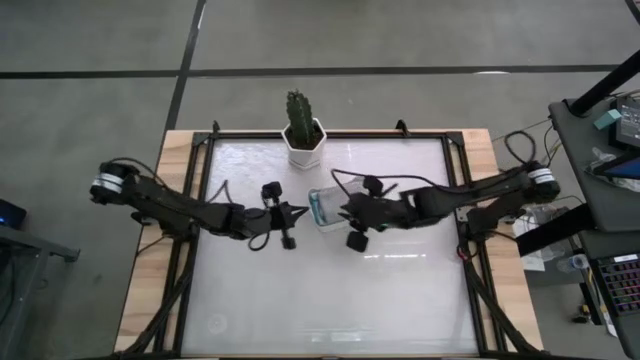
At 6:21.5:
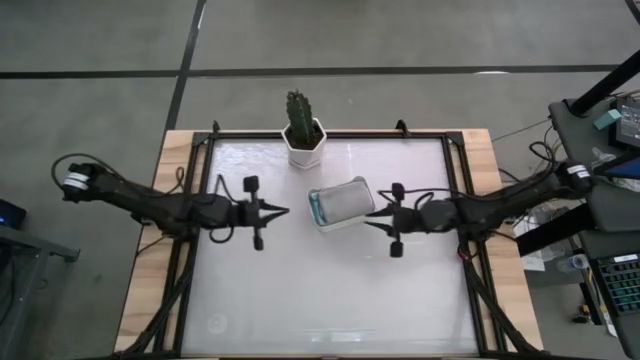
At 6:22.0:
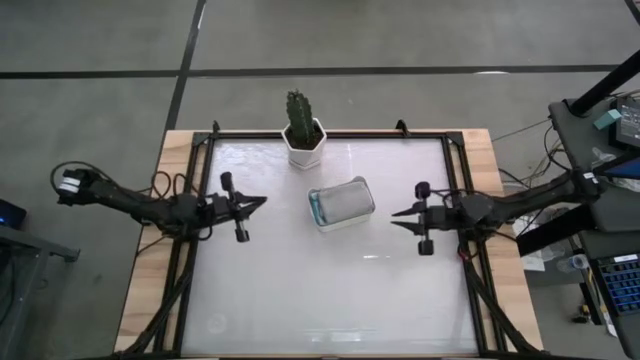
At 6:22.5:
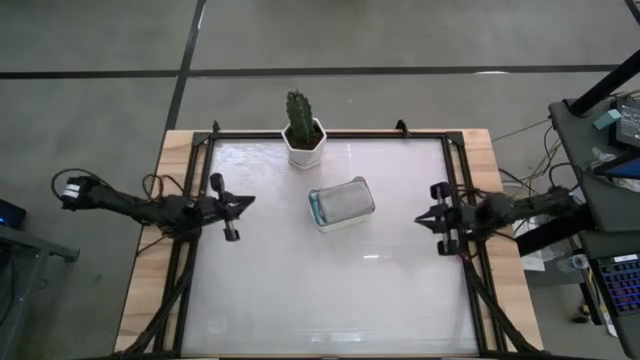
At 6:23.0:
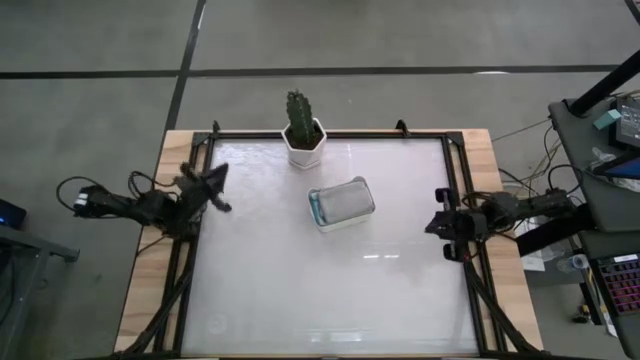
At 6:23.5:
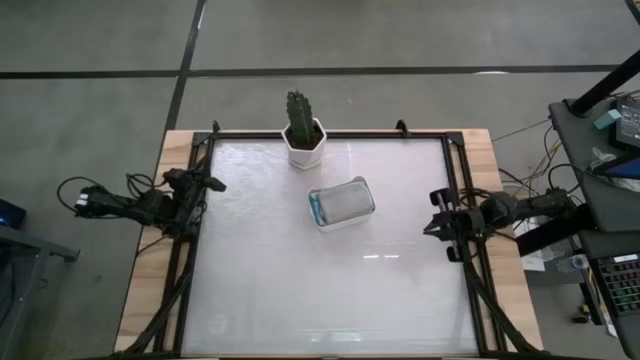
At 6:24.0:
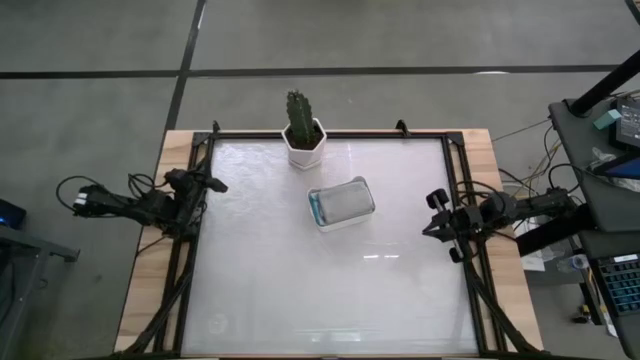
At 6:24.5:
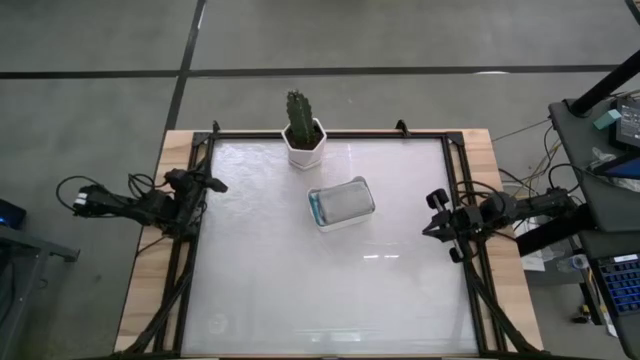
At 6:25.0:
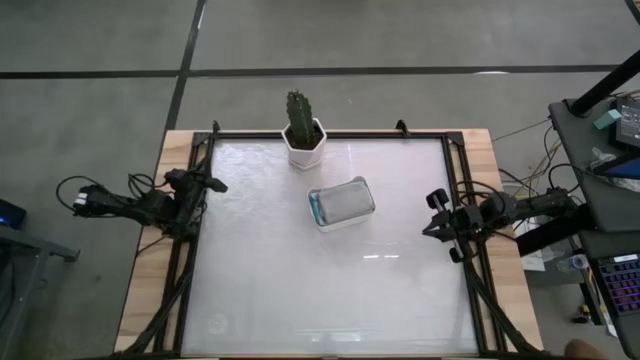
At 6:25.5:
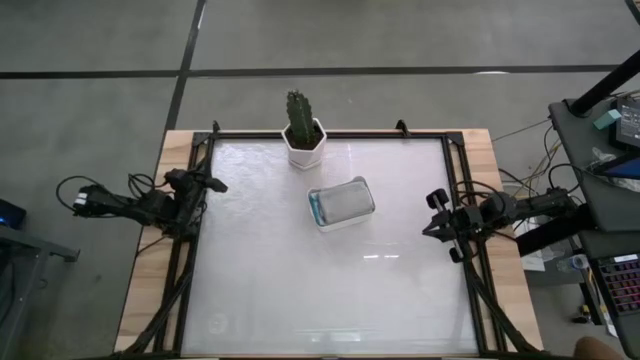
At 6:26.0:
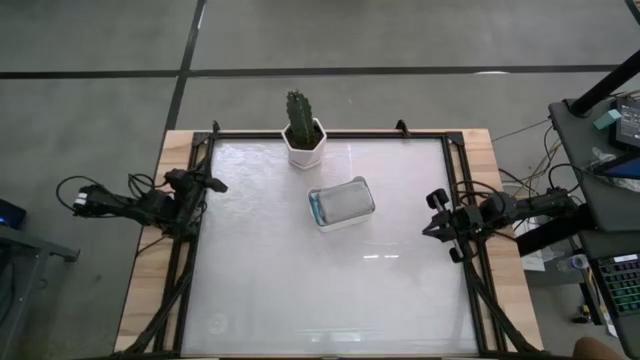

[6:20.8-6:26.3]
Task: Fold microfiber towels
Return to Home Position

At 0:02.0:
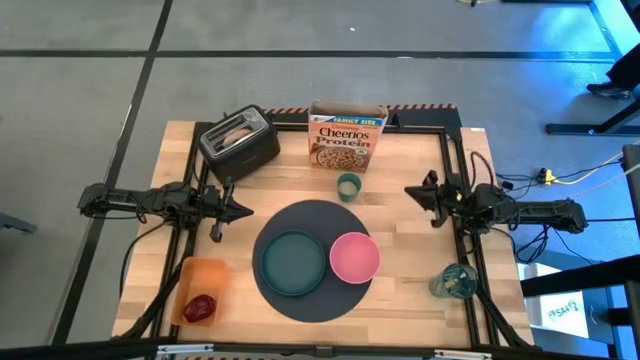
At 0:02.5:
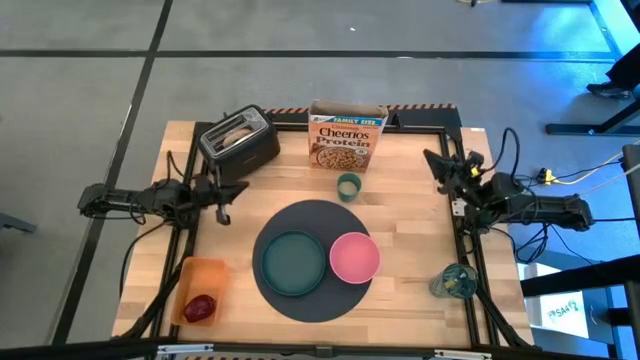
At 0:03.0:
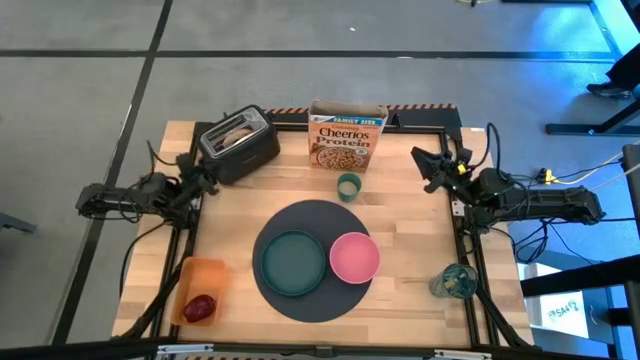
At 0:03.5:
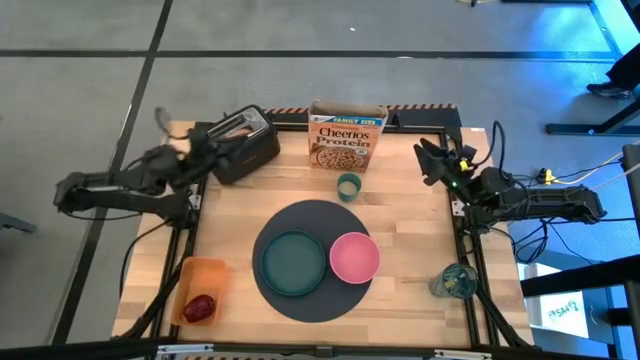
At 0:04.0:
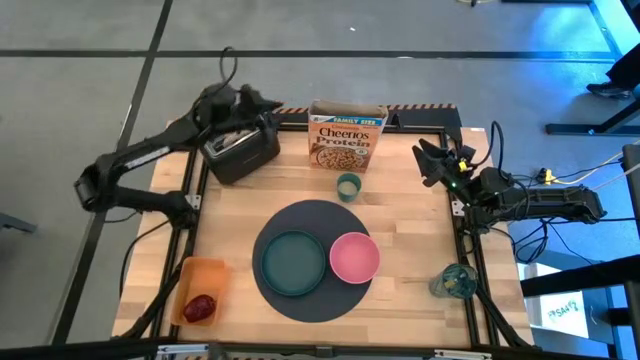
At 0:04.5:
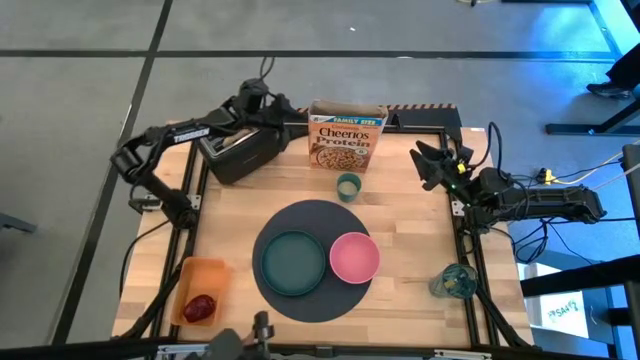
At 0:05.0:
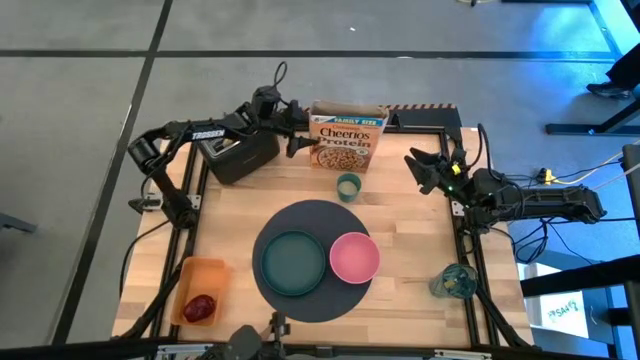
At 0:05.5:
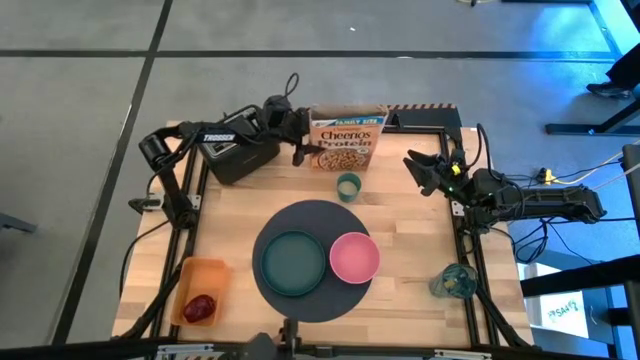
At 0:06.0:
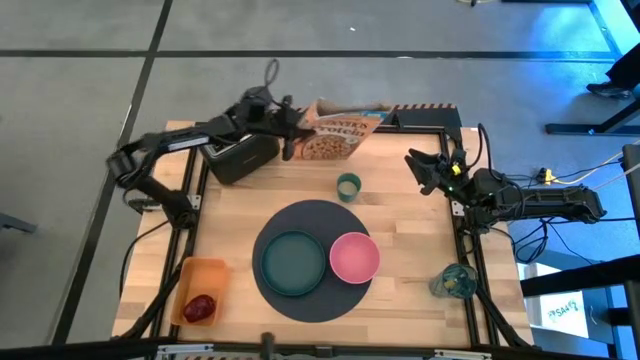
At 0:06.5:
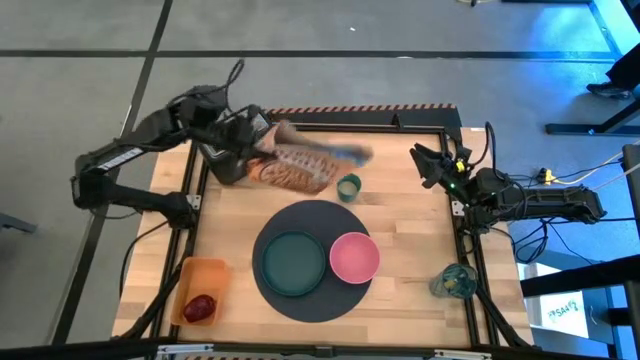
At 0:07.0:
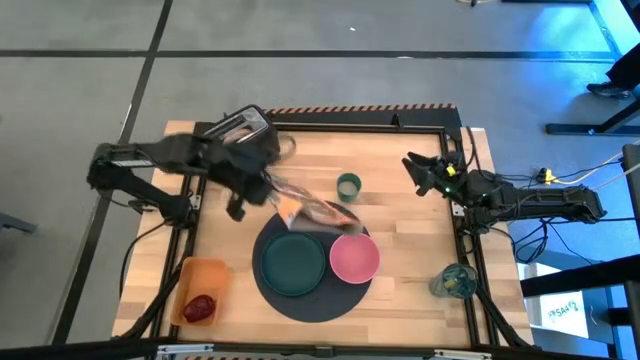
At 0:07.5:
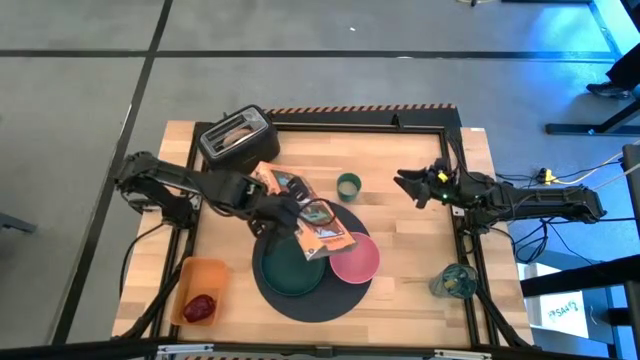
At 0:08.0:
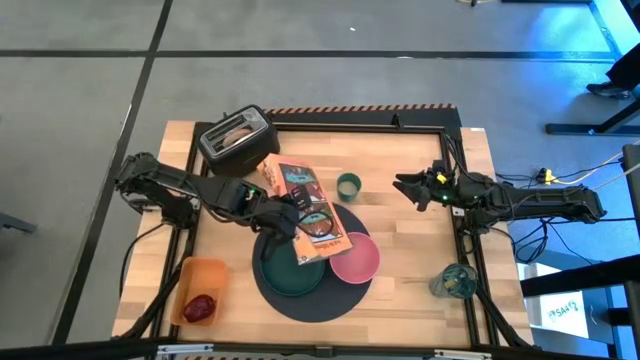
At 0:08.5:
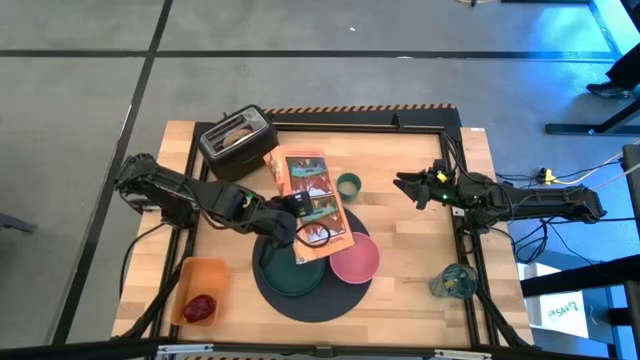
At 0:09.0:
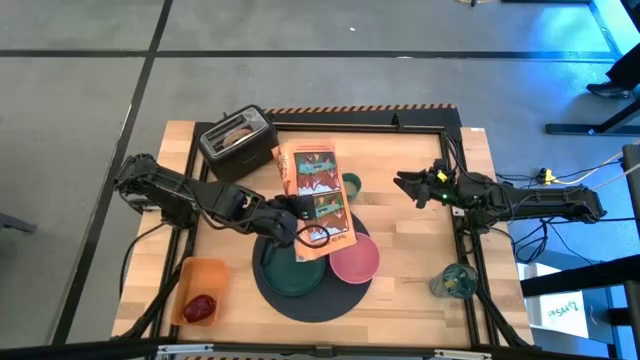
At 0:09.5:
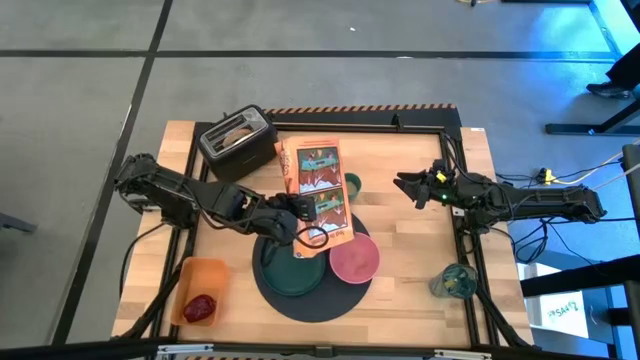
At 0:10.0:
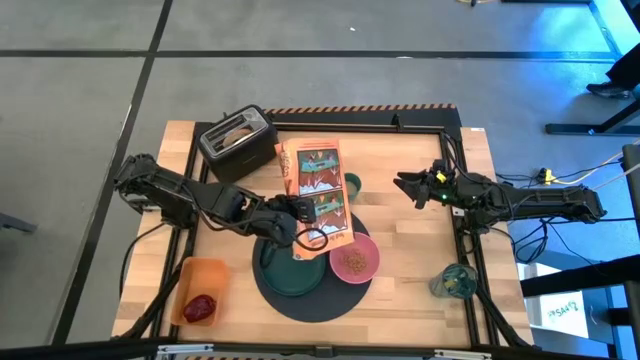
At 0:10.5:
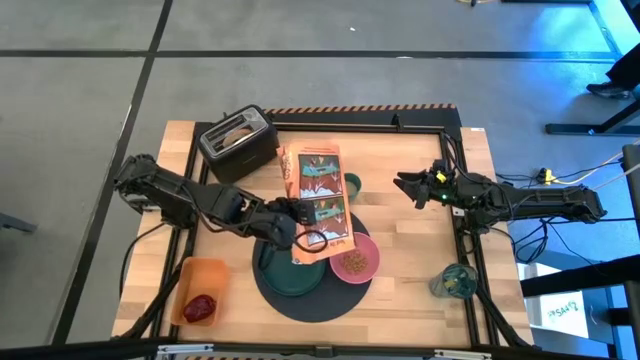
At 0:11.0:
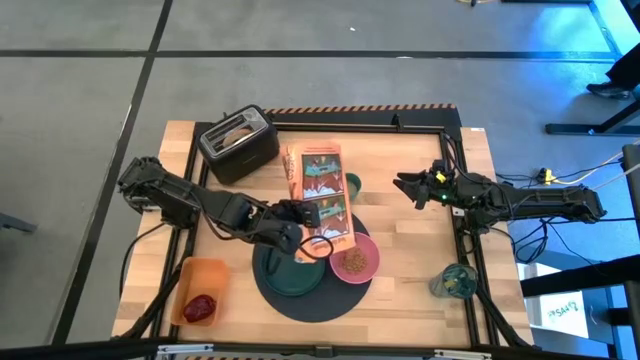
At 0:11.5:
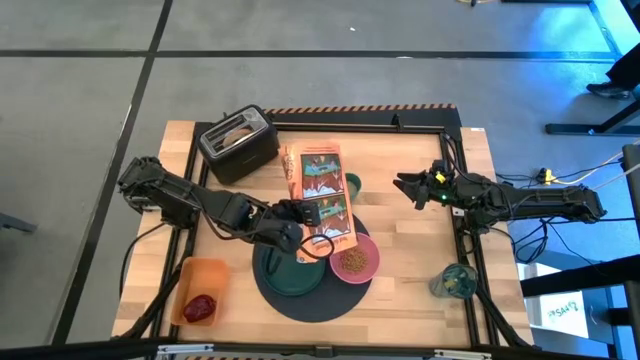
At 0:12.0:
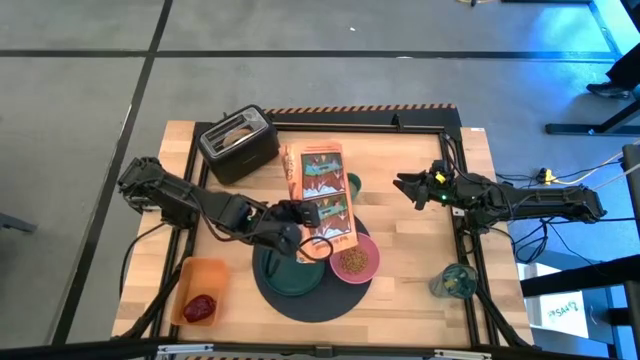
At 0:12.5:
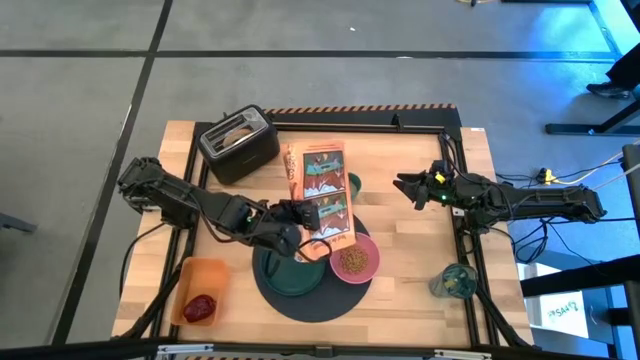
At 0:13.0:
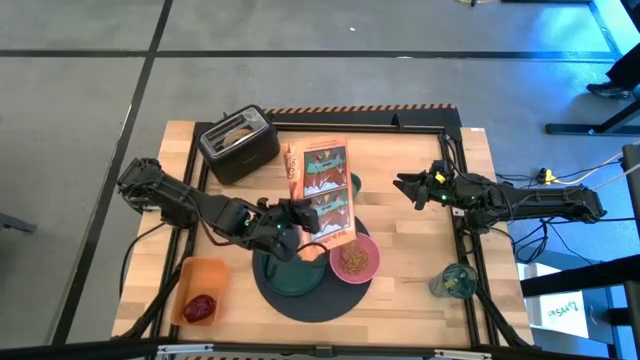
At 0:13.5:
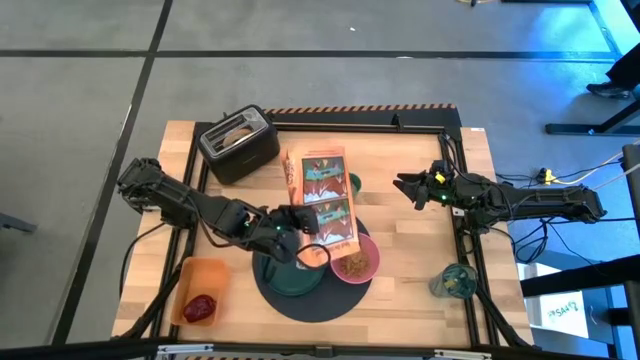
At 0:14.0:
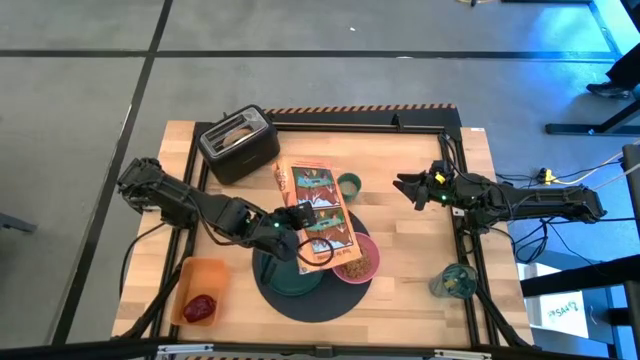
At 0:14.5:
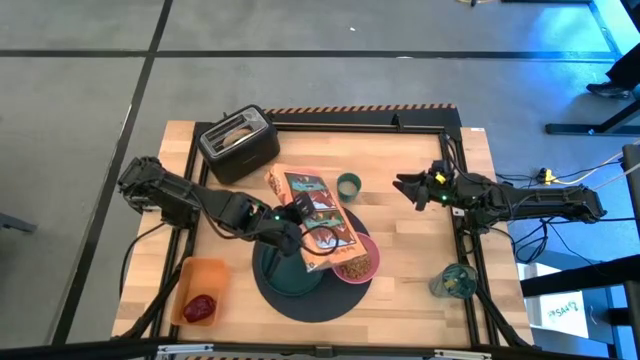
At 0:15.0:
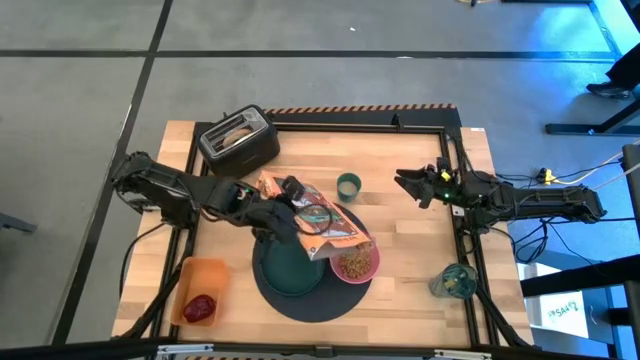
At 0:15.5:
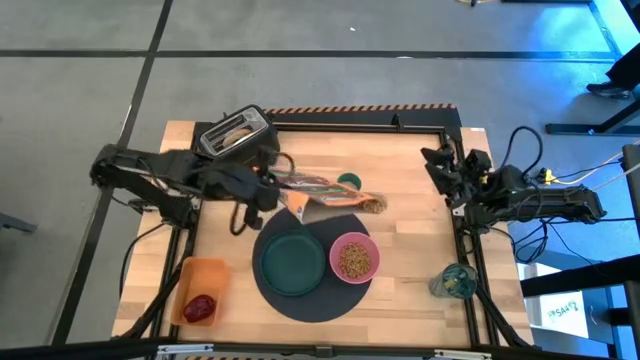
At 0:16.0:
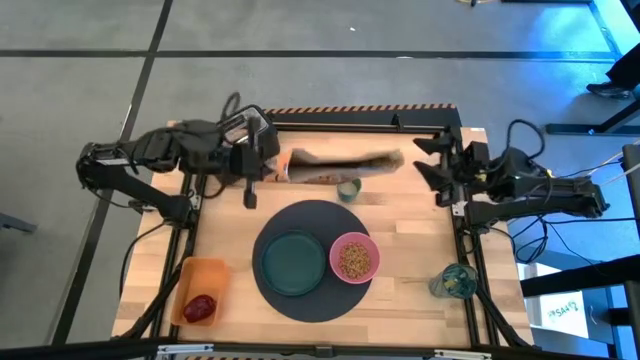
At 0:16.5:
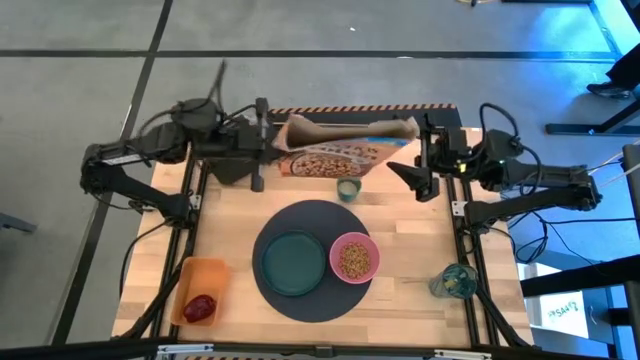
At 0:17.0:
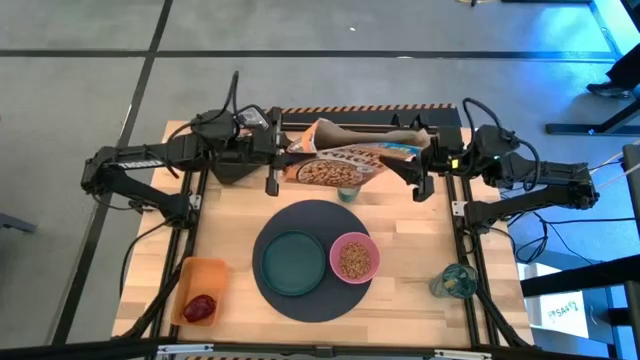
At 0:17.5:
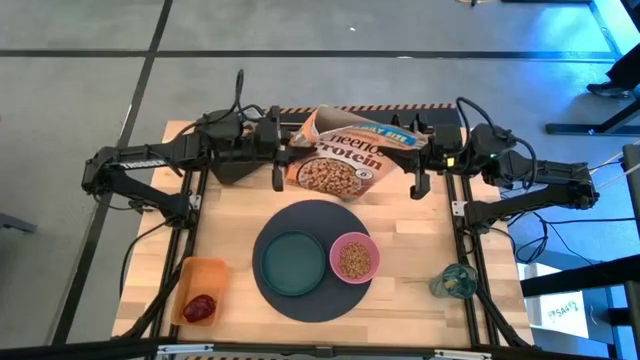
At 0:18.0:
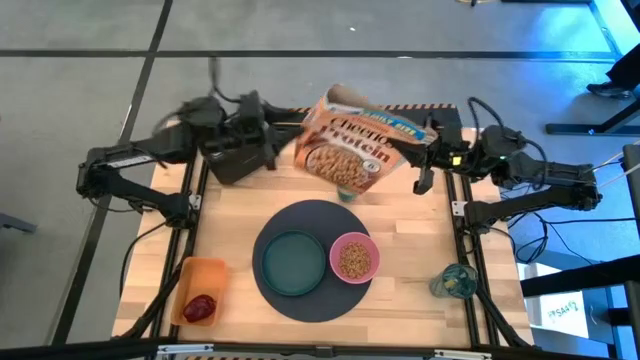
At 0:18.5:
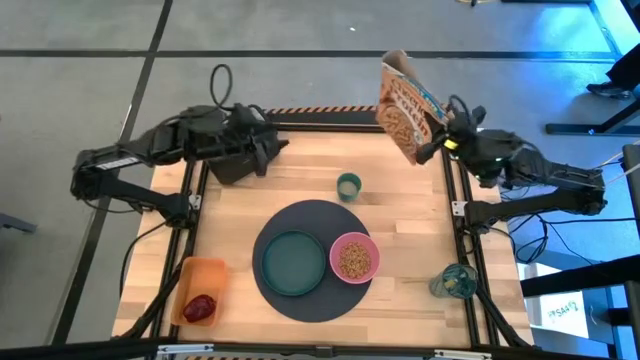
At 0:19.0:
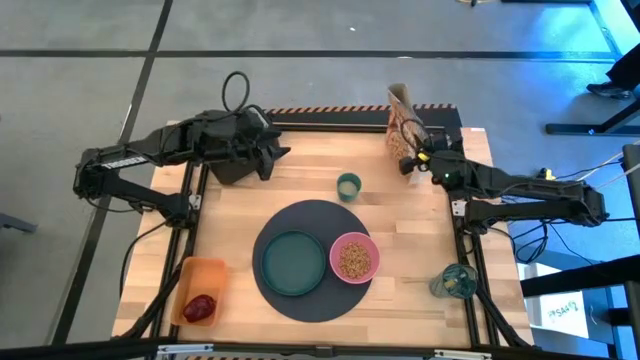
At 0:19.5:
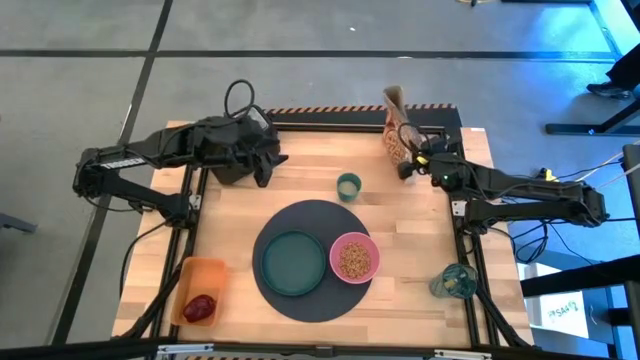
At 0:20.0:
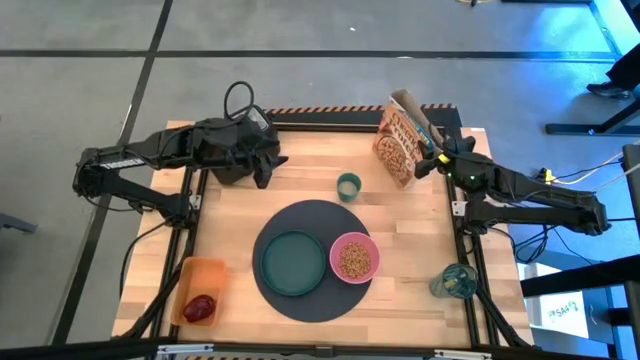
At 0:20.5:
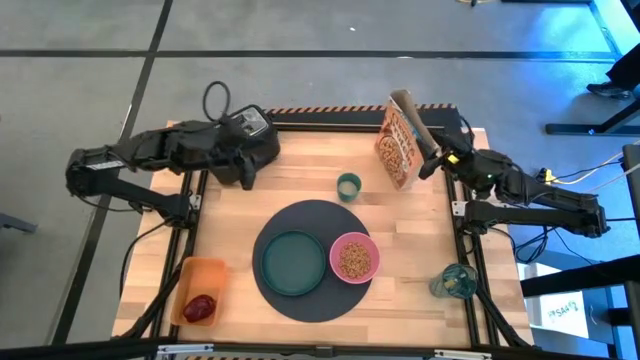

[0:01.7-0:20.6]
Task: Arrange a breakfast setting
Pour the cereal from the cereal box into the pink bowl on the placemat
